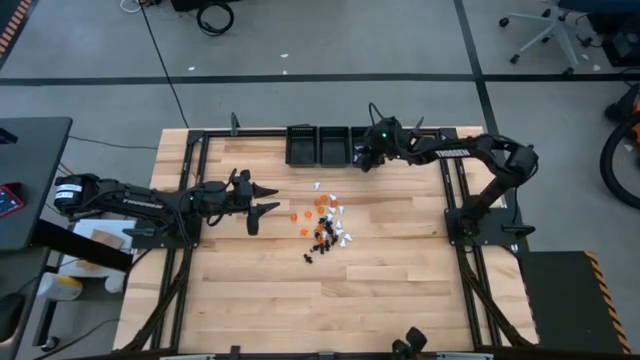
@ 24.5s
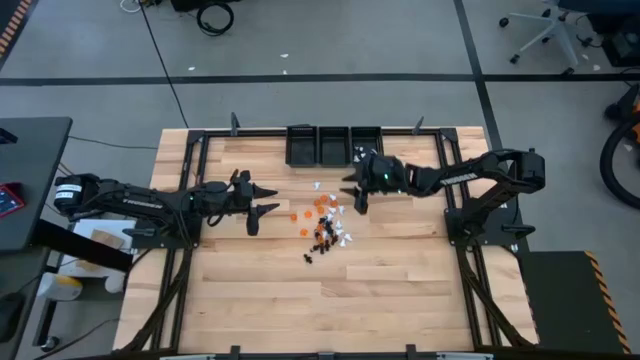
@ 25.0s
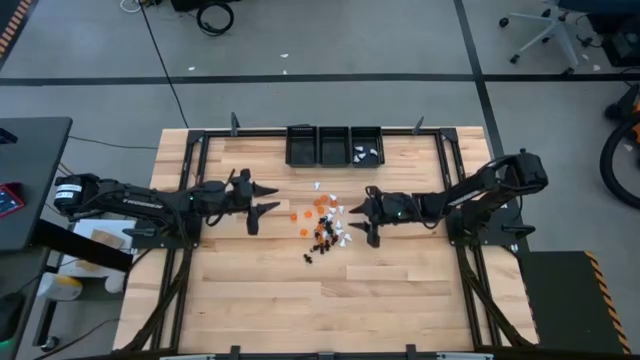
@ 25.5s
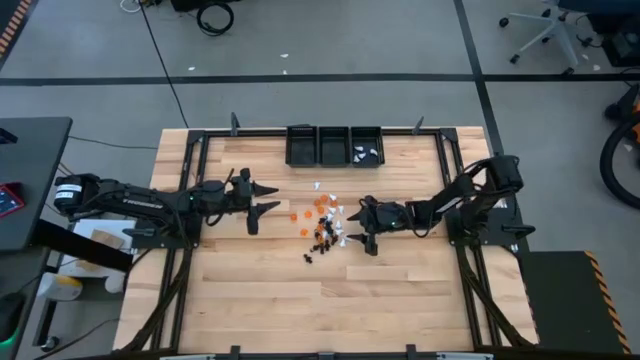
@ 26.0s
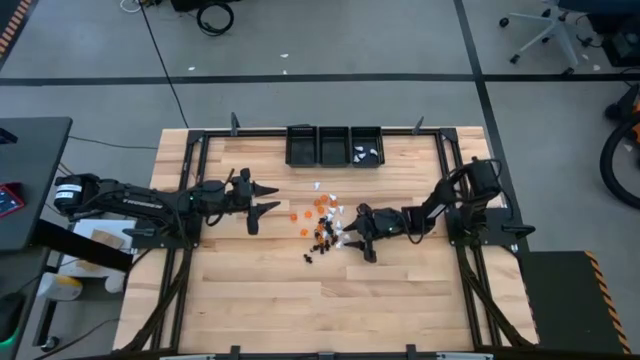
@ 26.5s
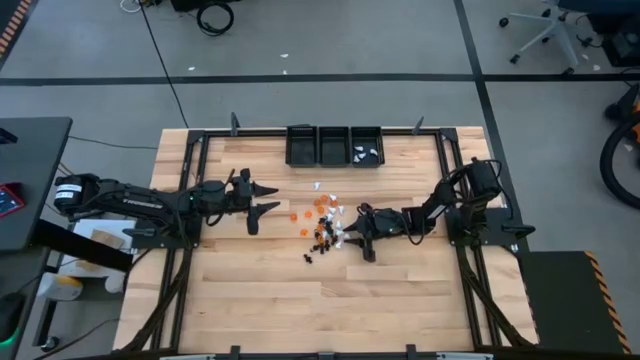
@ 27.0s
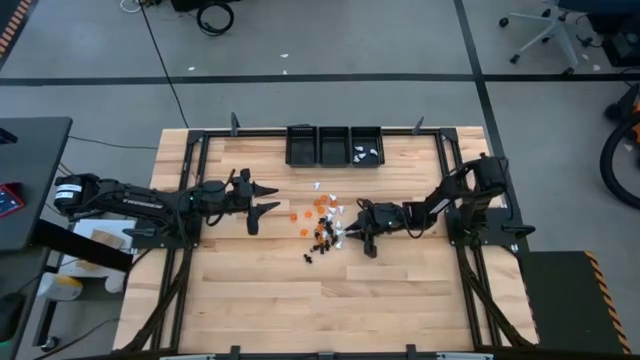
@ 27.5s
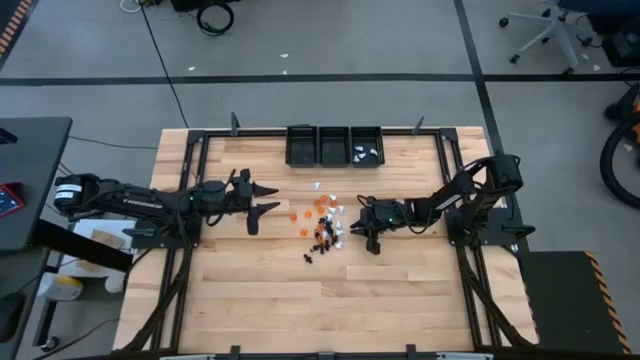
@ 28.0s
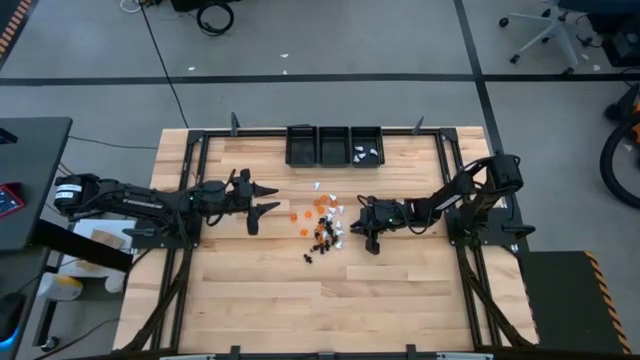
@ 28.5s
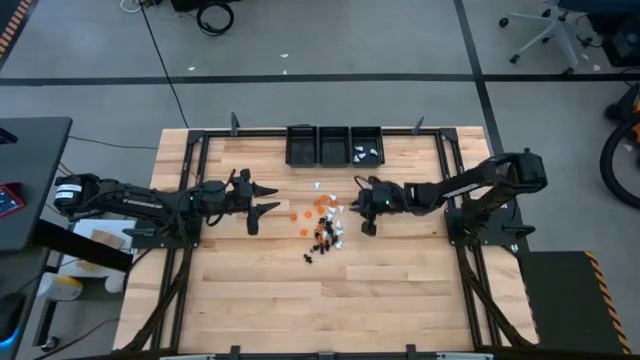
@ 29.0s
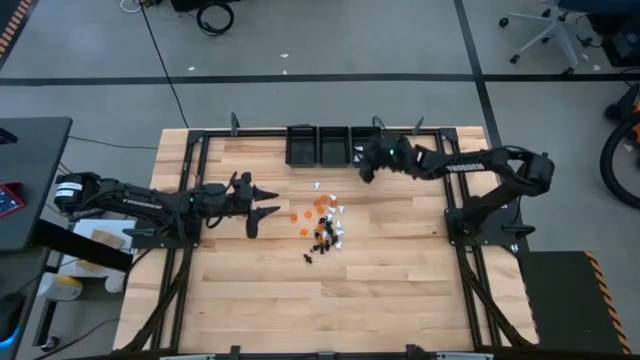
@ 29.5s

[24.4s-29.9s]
Task: Sort game pieces by color
Put the white game piece into the right black basket

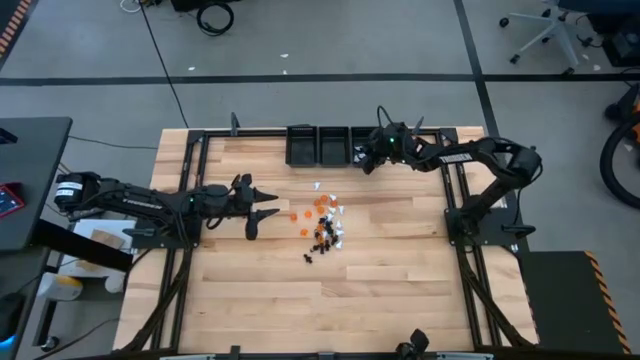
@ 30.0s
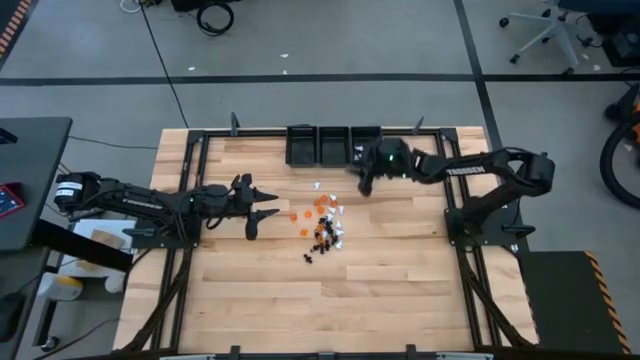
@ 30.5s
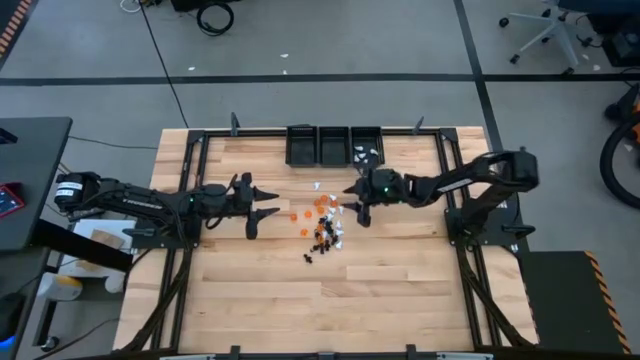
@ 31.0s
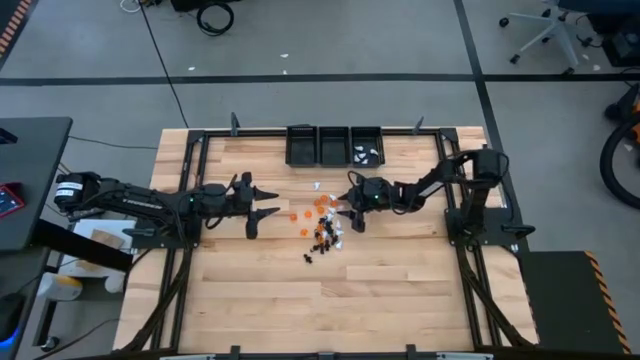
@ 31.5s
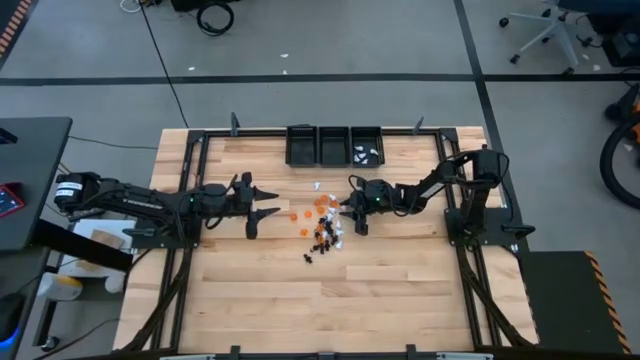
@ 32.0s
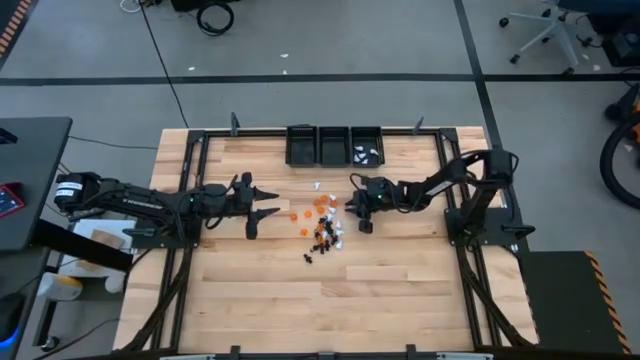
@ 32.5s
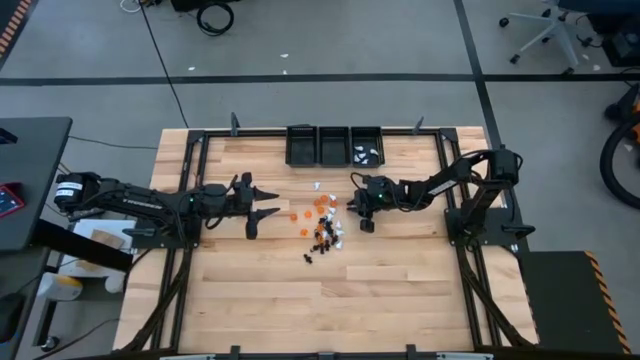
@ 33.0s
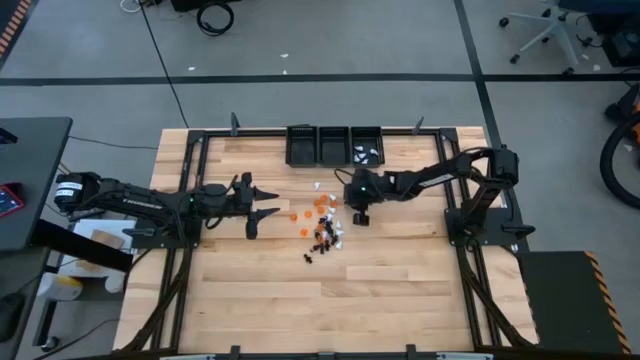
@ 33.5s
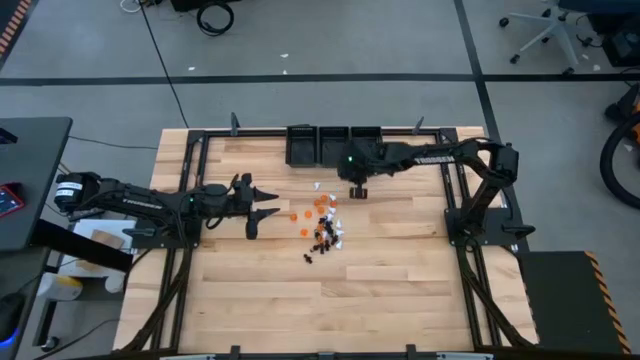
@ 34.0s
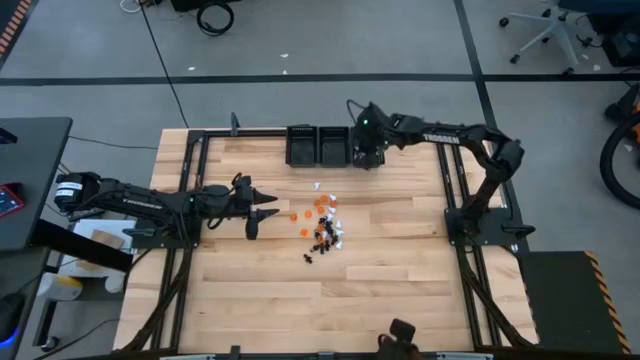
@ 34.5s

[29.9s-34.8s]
Put the white game piece into the right black basket

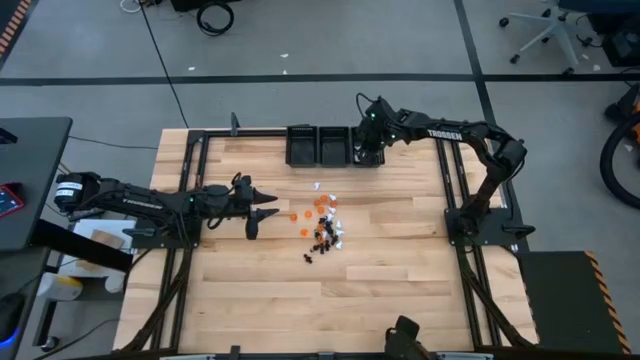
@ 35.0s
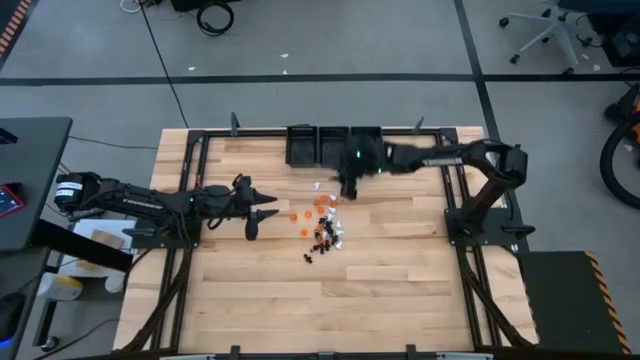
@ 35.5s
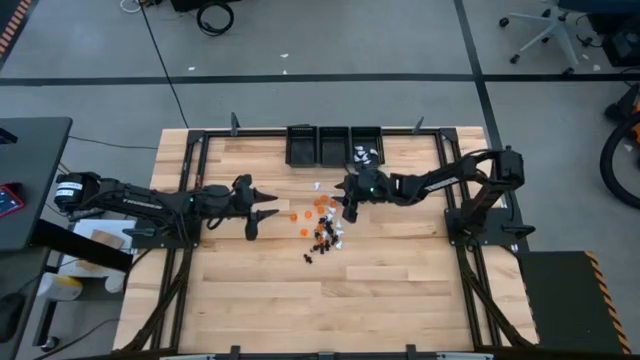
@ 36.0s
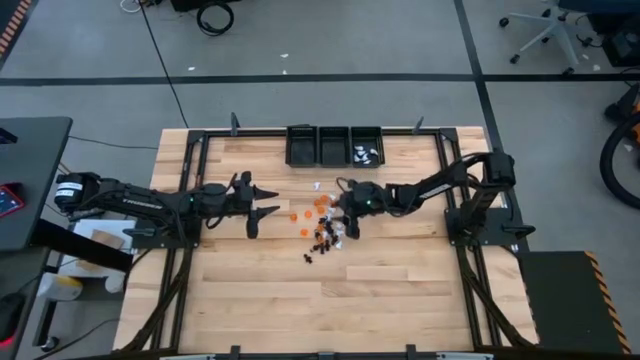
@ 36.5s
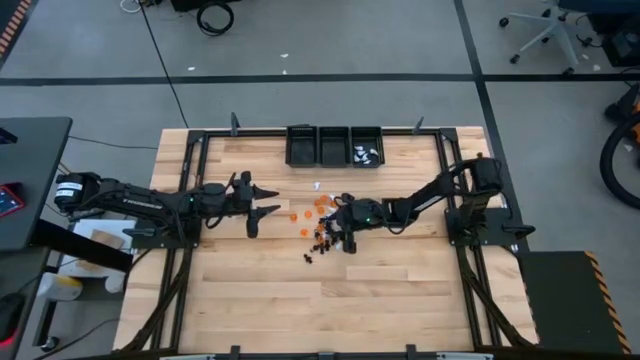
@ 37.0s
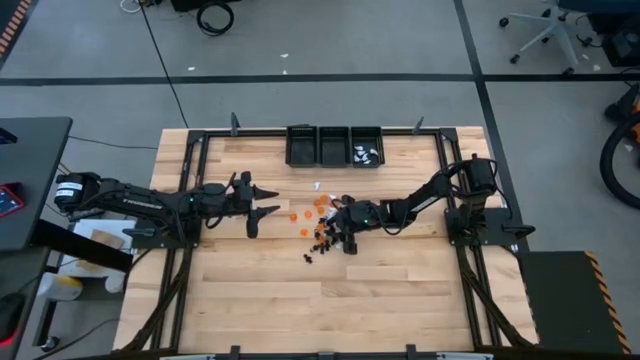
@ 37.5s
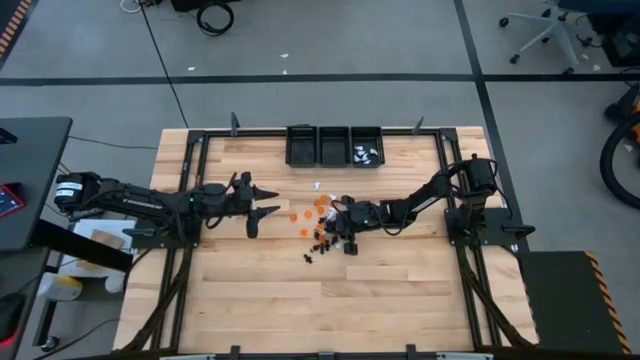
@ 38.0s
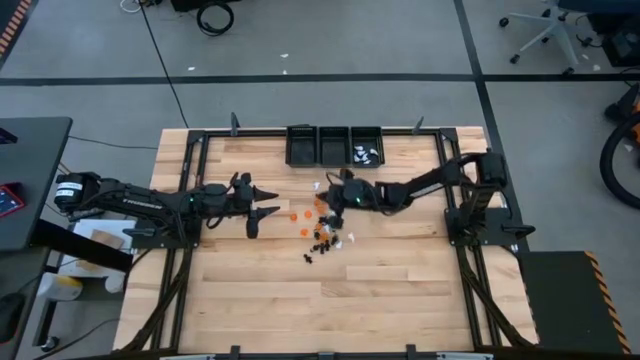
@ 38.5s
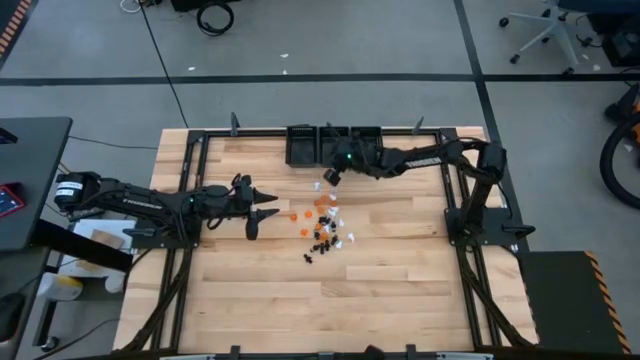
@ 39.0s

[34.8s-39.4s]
Put the black game piece into the center black basket

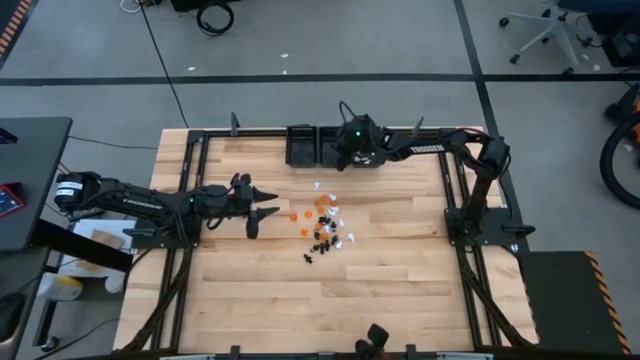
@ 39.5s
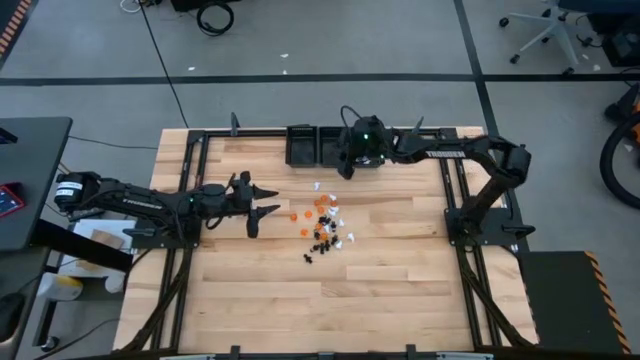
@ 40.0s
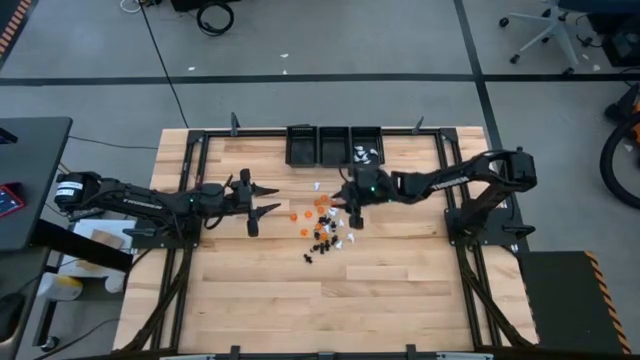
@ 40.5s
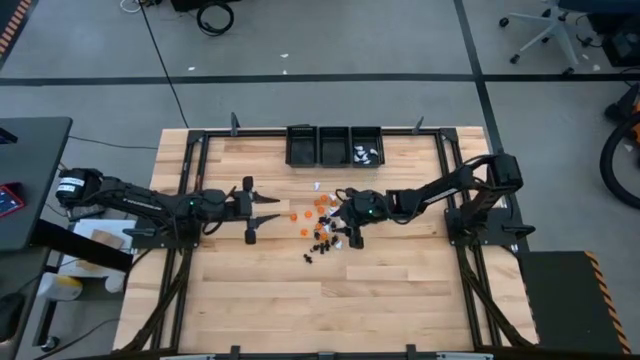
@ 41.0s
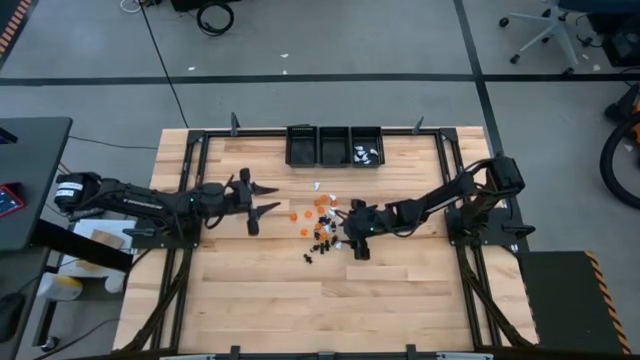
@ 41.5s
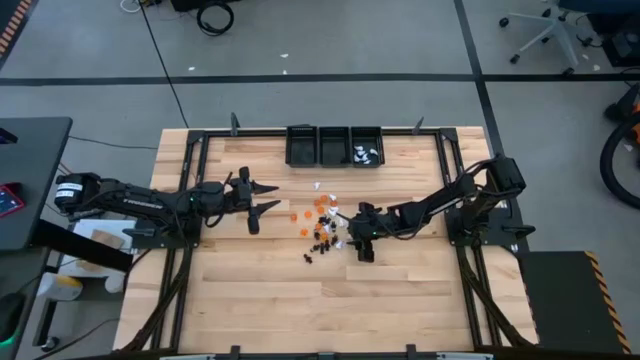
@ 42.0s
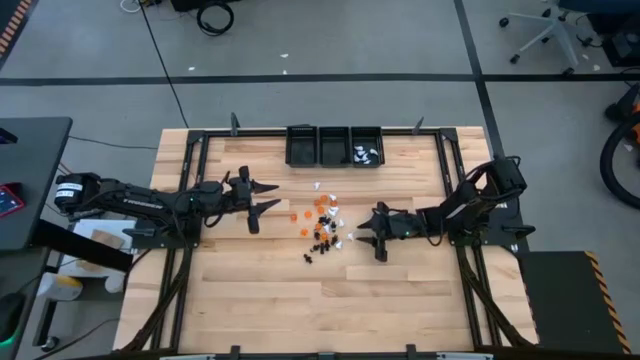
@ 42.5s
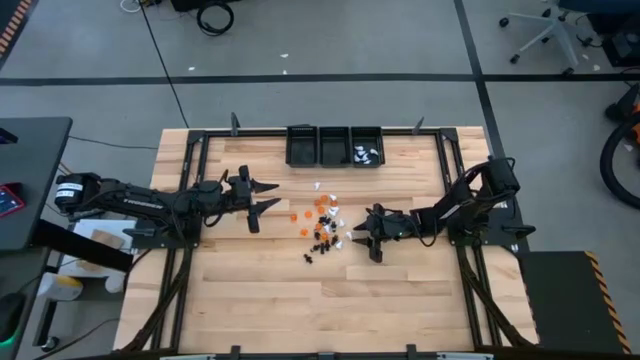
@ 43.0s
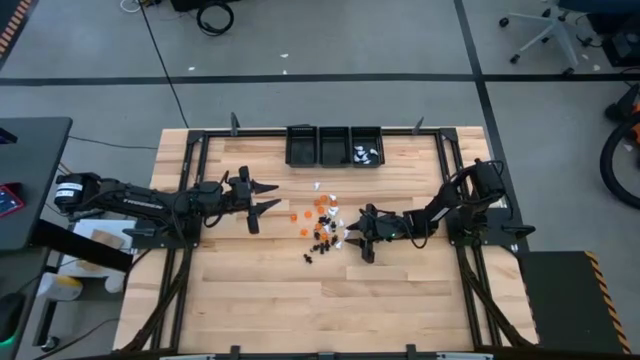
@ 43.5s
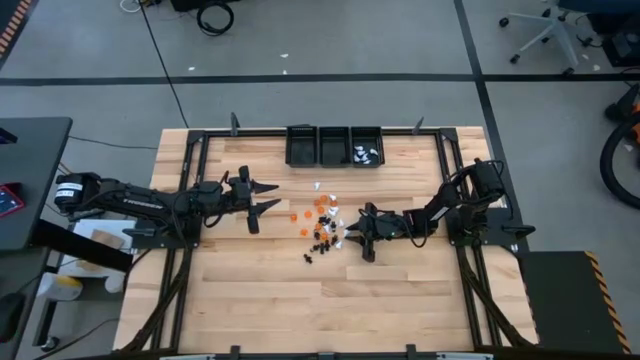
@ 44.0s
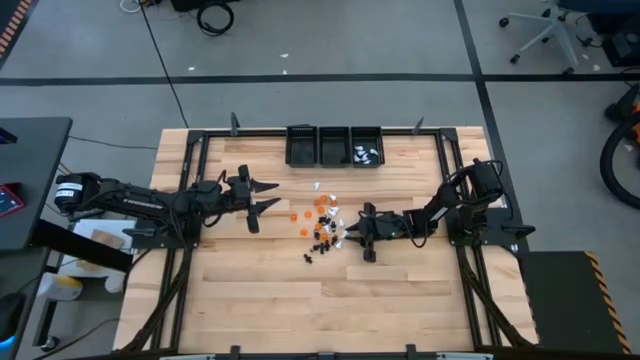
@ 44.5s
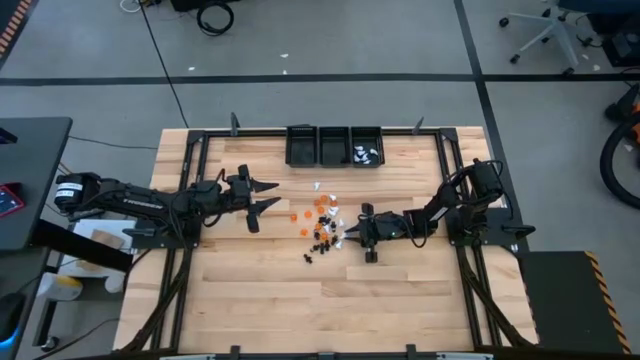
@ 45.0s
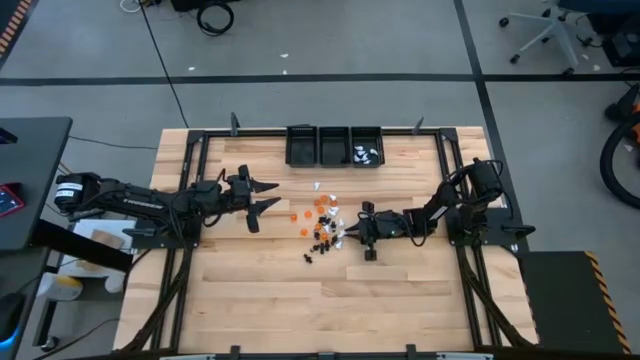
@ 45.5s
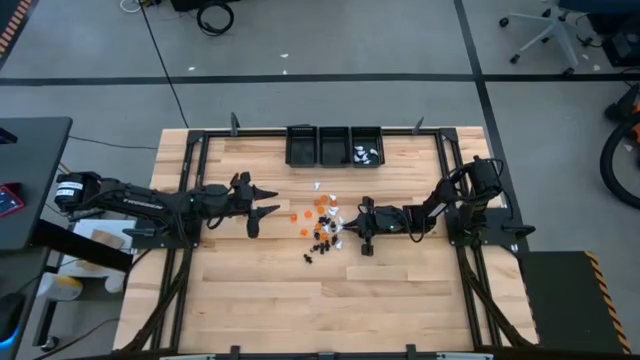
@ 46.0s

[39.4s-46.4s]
Put the white game piece into the right black basket
